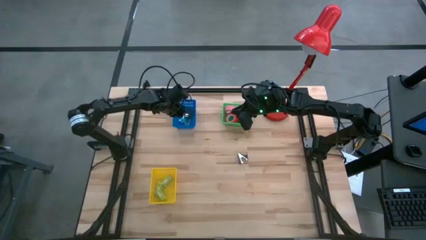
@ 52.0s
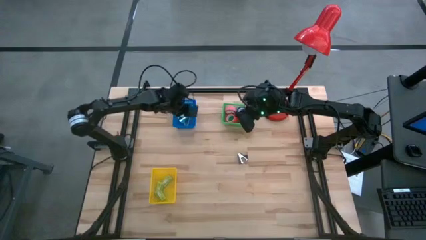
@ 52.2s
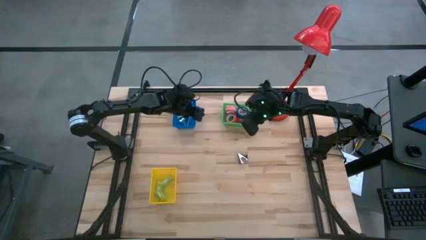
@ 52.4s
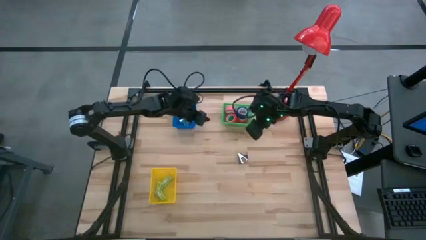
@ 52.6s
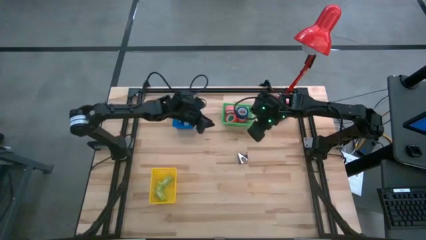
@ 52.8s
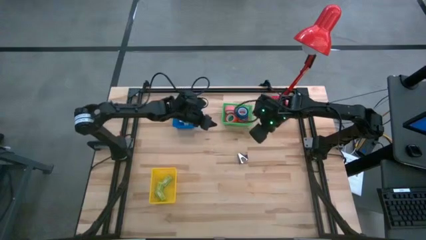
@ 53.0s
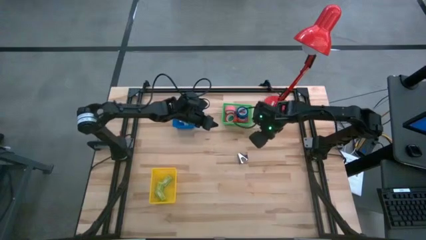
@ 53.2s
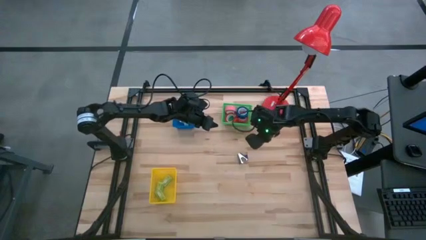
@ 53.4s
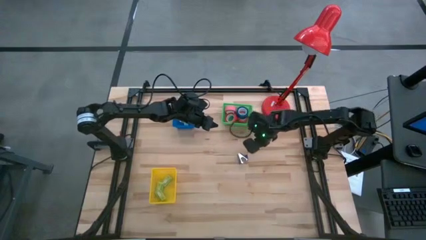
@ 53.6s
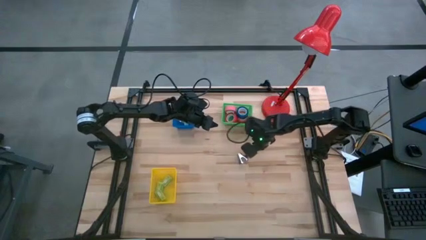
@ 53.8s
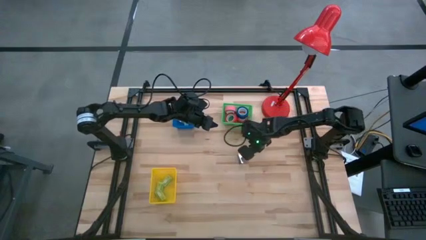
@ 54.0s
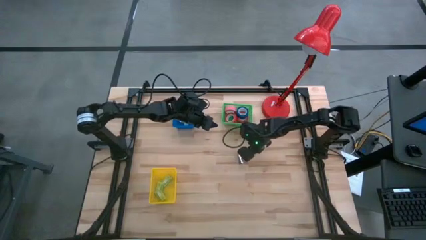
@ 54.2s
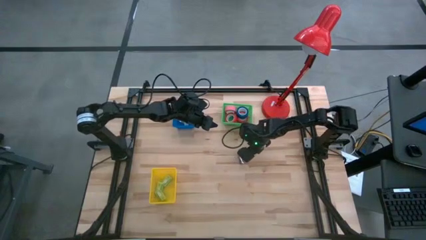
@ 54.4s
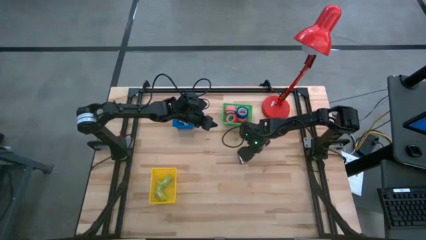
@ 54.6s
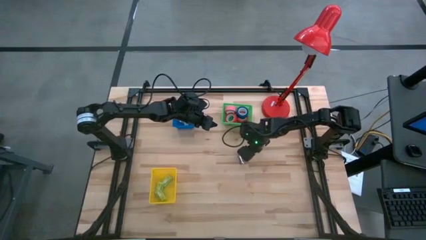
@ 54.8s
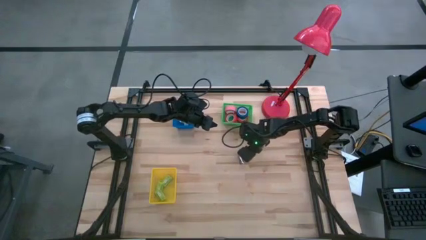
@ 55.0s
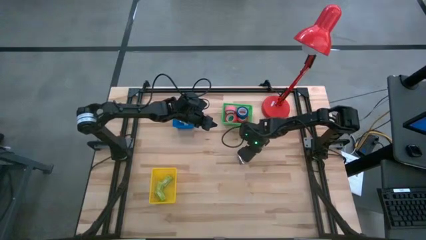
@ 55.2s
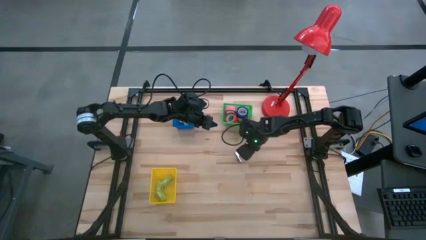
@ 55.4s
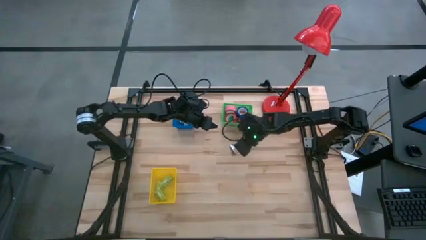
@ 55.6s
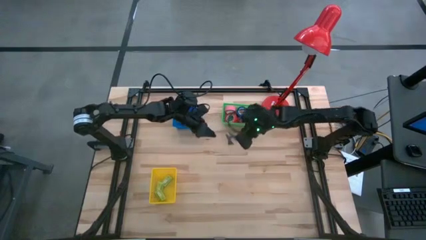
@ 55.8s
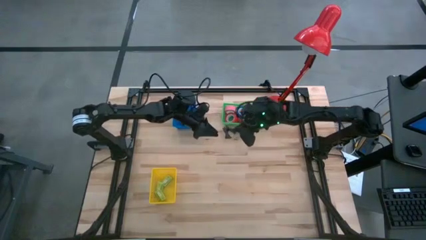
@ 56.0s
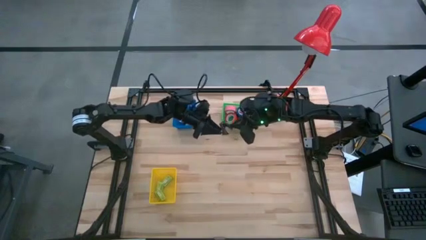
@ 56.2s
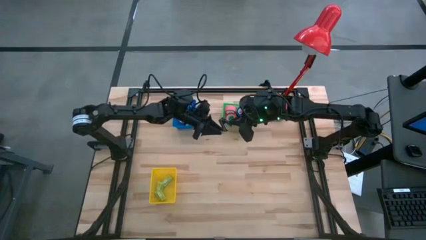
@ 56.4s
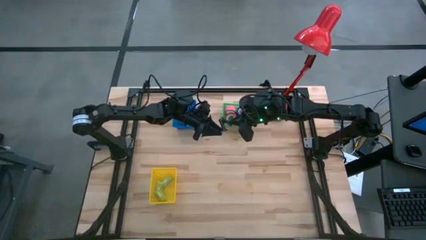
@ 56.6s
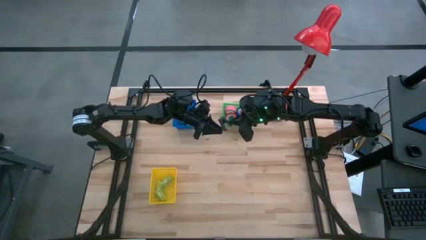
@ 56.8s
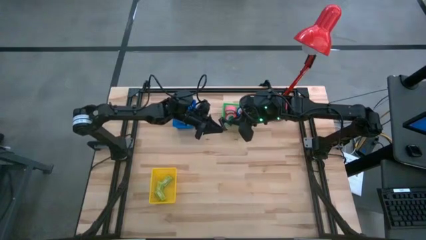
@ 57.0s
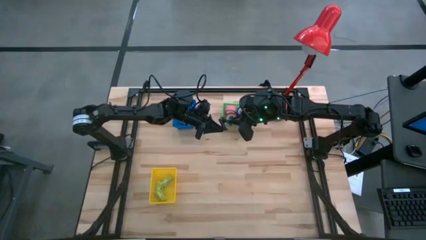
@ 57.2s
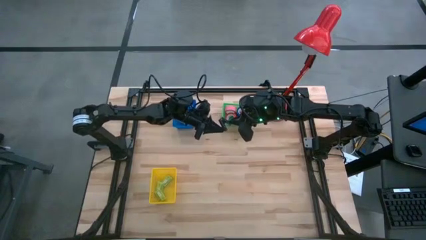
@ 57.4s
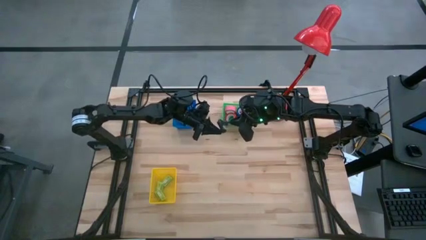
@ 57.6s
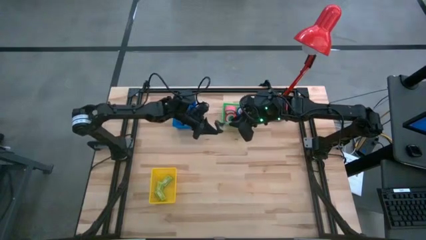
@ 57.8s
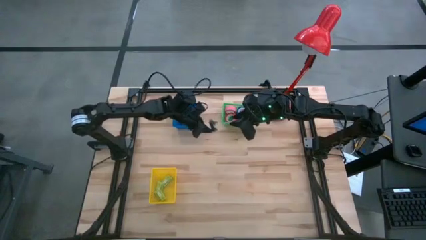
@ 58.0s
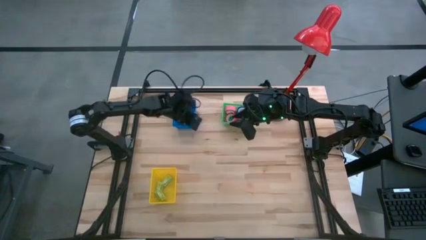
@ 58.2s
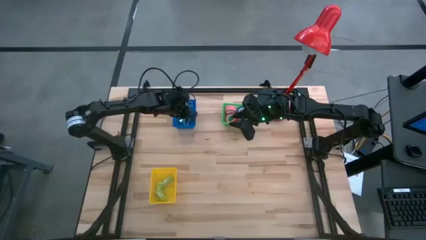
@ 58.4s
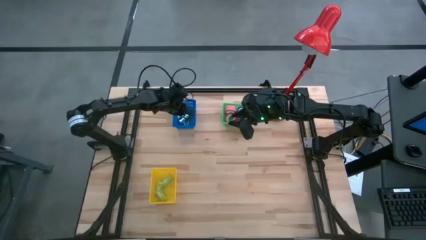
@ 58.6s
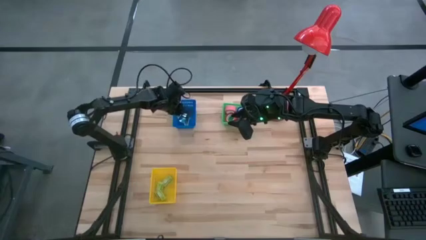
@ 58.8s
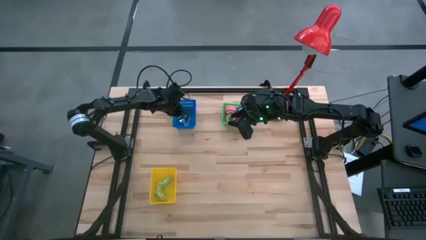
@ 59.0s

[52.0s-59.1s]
Task: Pick and place Stapler, Stapler remover, tape
Put the dark gray staple remover into the blue basket

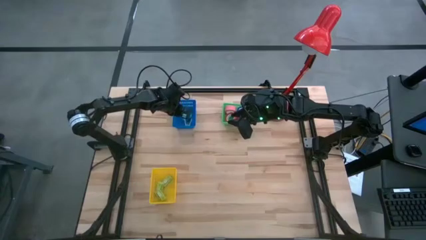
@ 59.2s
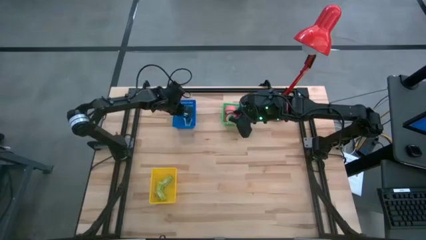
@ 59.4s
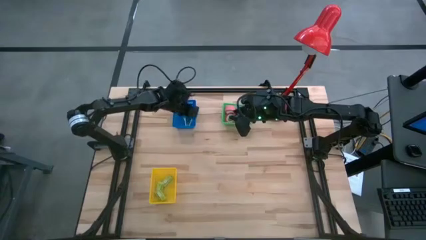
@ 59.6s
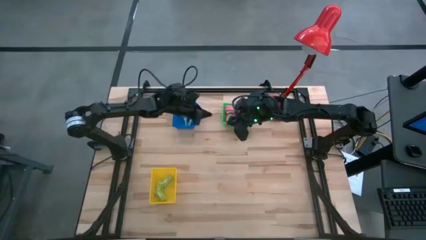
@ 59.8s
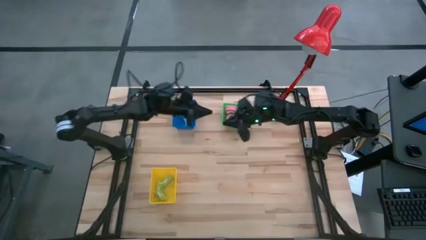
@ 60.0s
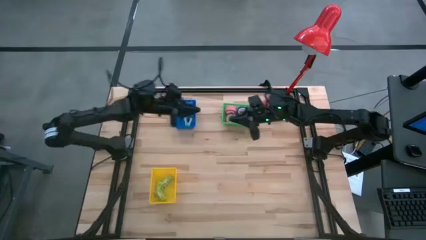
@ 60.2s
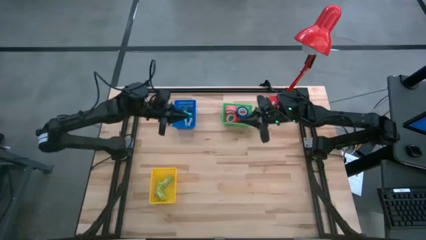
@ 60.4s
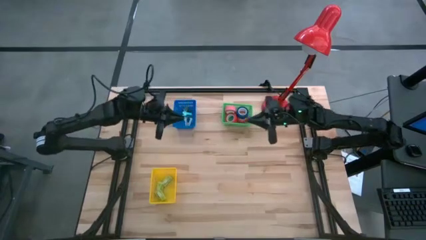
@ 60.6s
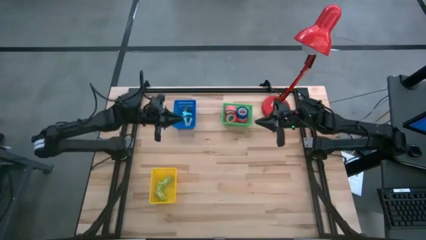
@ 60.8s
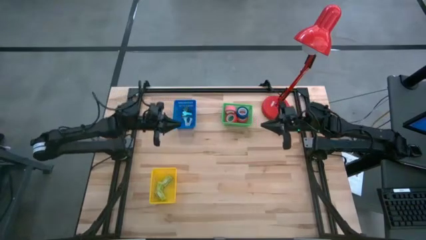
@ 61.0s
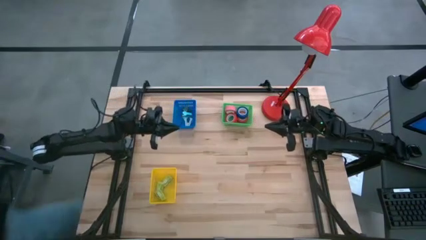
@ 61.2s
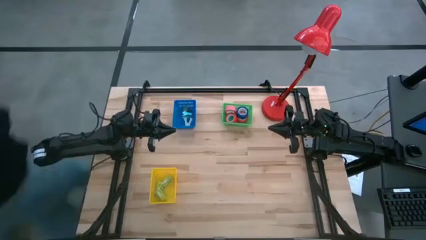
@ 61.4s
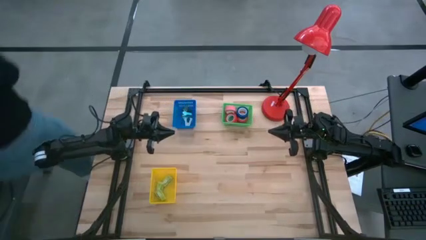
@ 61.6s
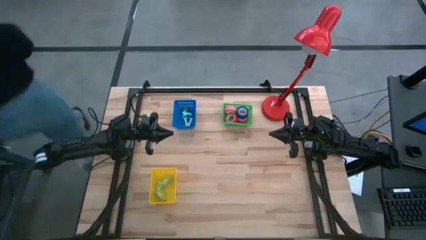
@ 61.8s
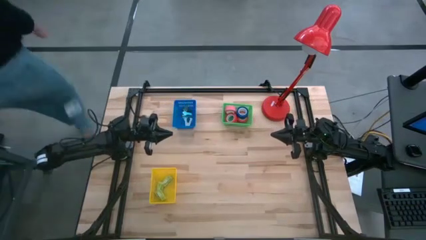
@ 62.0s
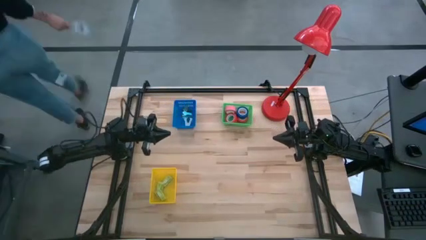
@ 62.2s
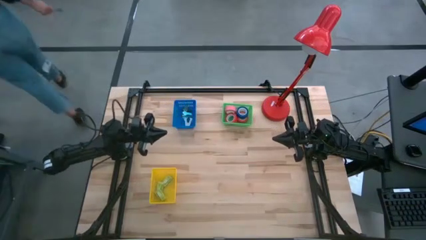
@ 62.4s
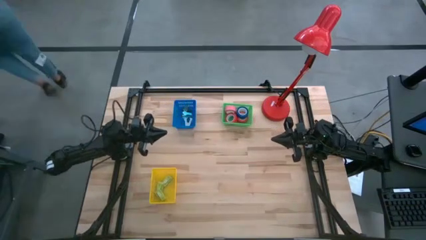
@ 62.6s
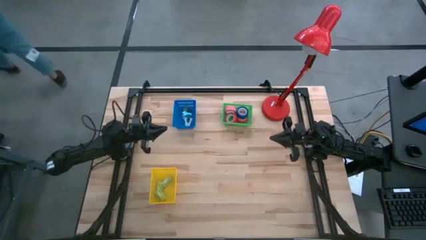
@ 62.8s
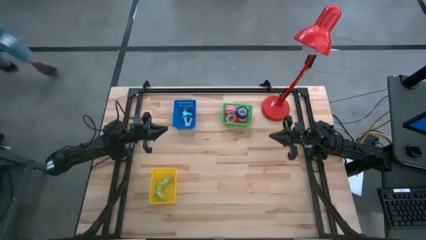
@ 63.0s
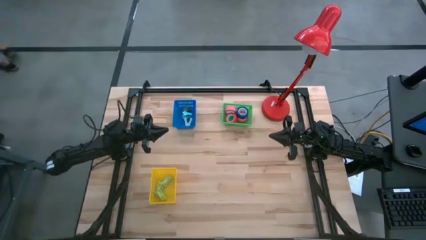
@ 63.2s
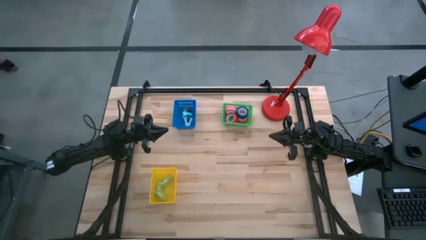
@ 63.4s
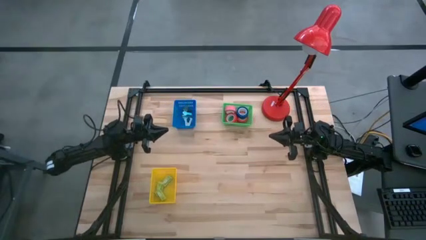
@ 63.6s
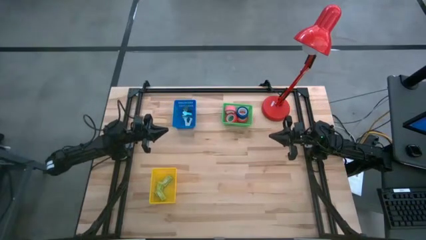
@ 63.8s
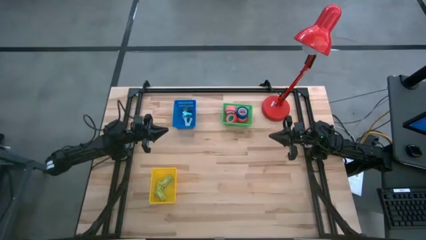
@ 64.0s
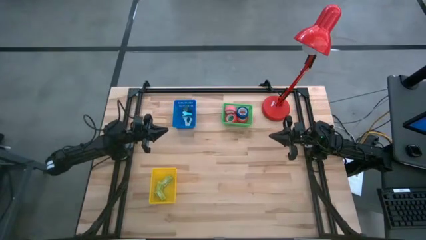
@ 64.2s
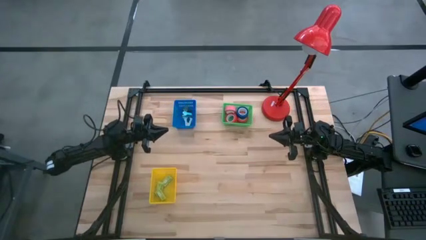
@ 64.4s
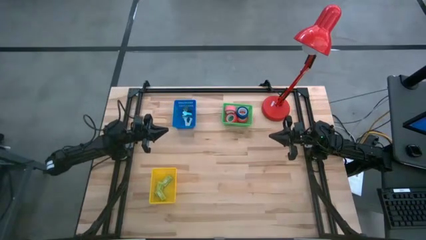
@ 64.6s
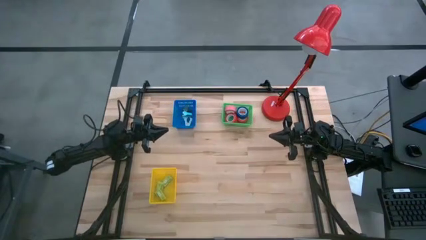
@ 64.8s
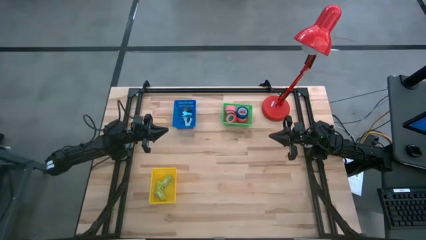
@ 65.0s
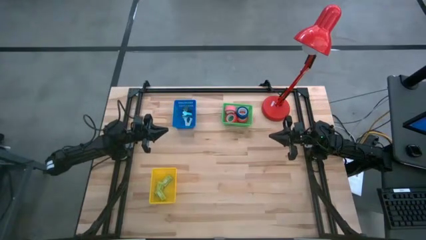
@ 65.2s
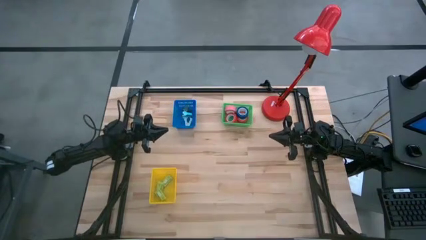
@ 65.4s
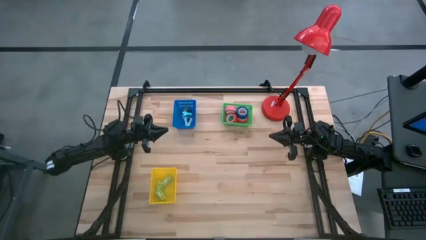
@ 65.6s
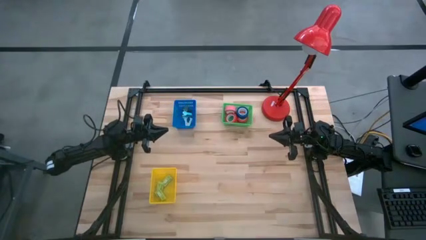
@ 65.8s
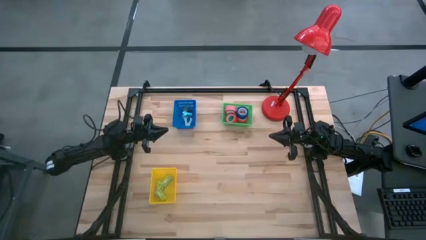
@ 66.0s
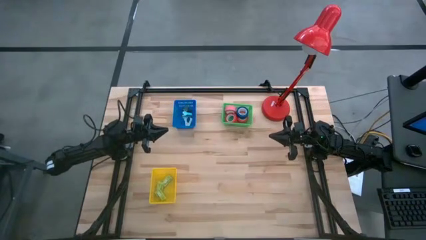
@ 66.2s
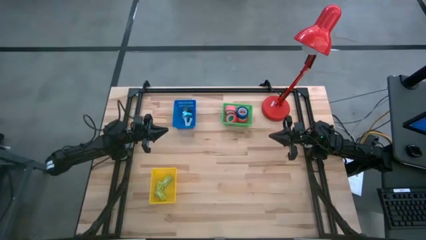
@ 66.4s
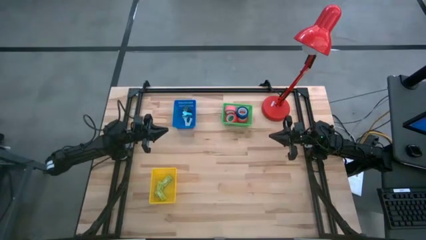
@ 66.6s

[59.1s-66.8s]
Return to Home Position

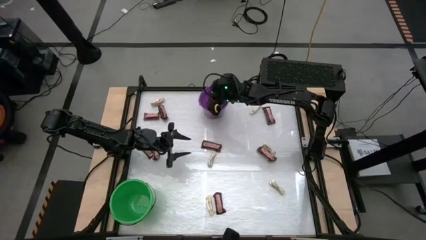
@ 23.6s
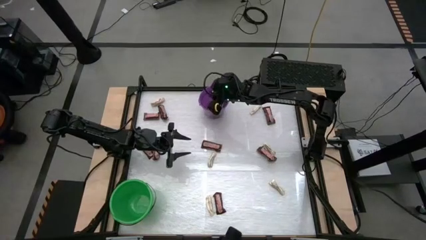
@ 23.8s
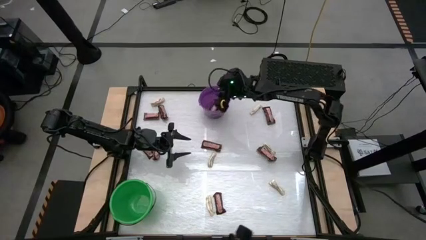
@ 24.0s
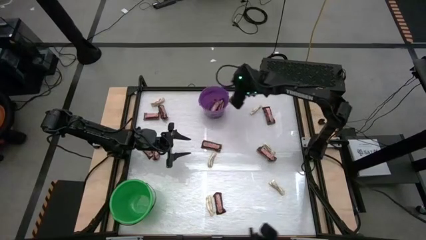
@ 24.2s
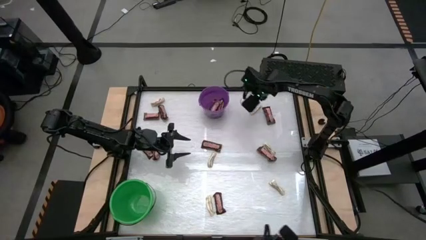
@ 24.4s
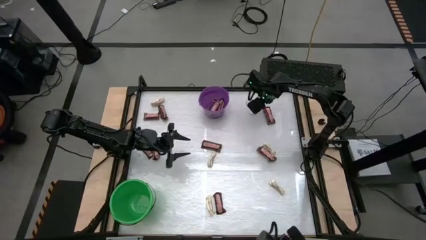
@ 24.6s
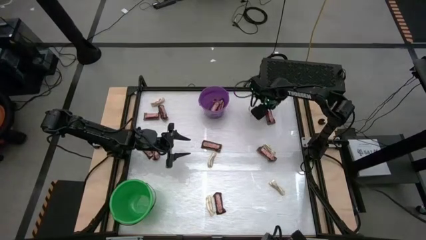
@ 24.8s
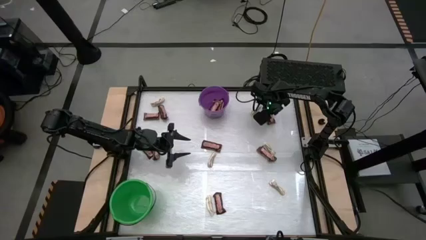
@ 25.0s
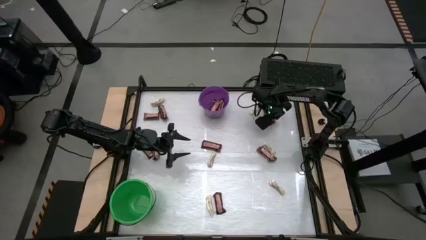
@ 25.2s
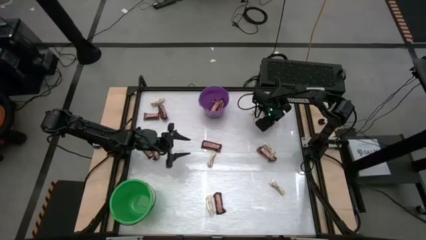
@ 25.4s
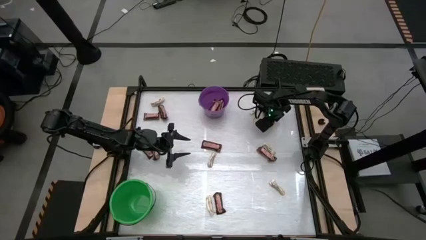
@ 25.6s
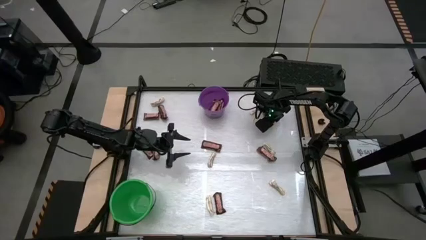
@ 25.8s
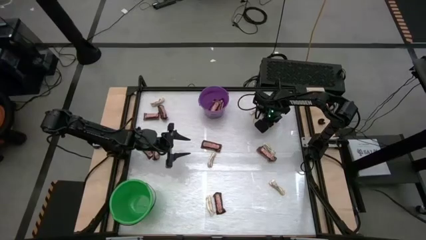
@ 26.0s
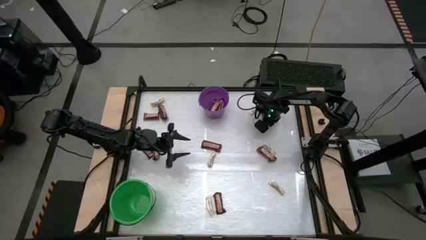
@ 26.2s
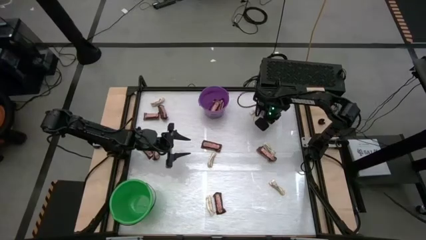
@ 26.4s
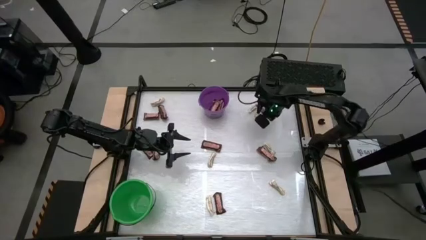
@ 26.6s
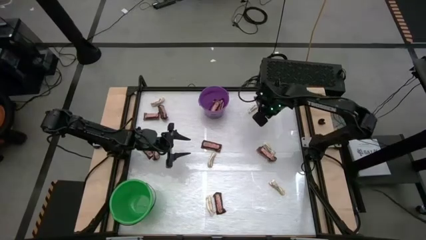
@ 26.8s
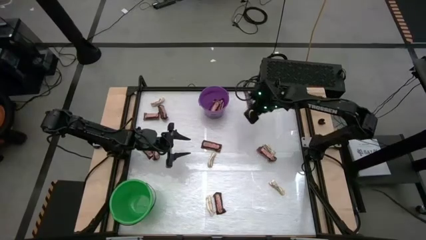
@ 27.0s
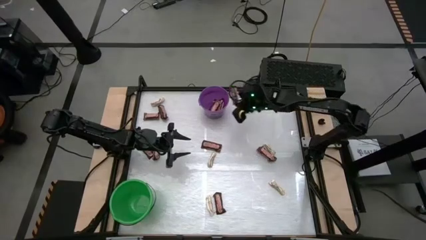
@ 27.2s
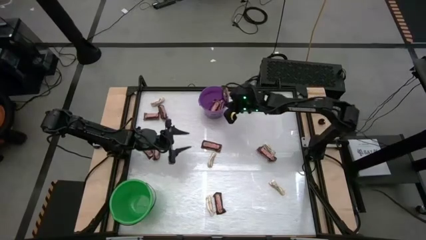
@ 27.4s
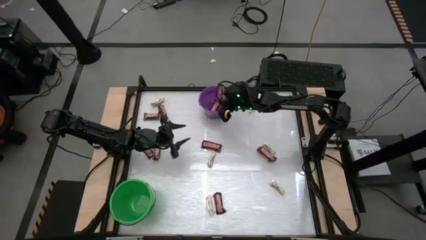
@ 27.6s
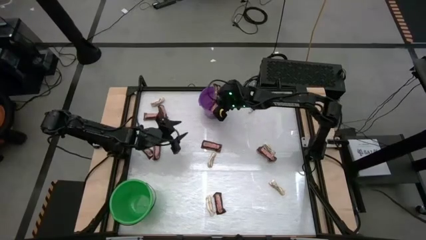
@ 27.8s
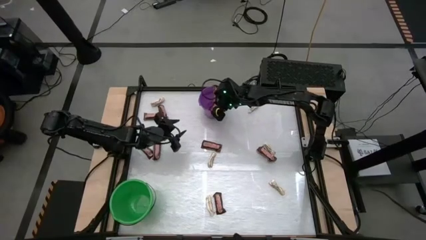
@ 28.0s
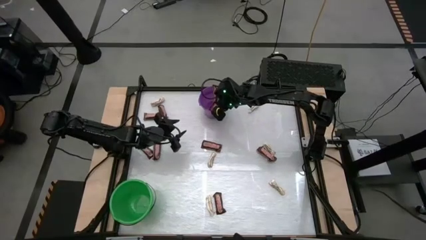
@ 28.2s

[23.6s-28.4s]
Task: Sort candy by brand, put in halloween buckets
Put the brown chocolate into the purple bucket
